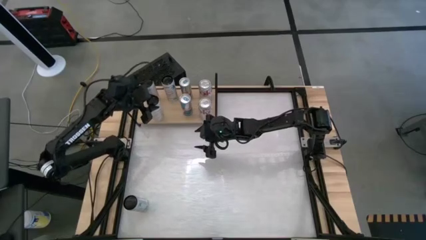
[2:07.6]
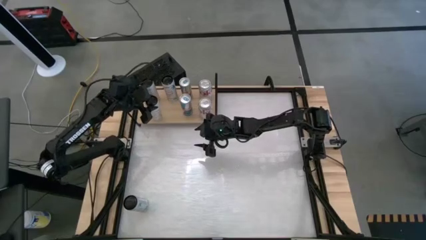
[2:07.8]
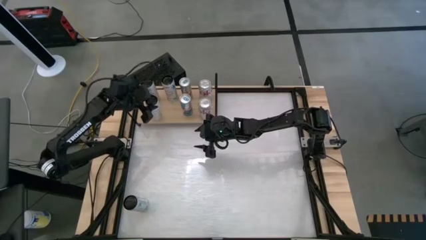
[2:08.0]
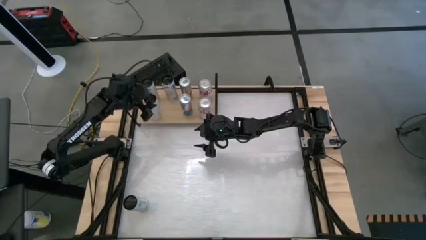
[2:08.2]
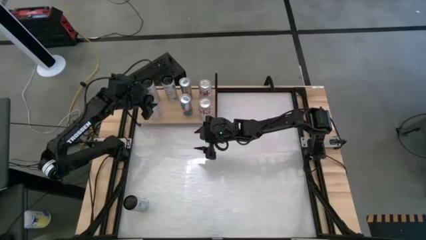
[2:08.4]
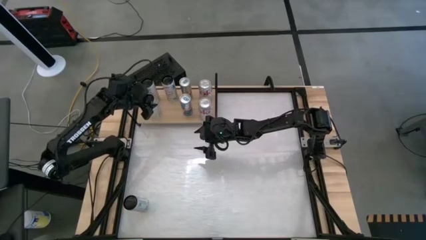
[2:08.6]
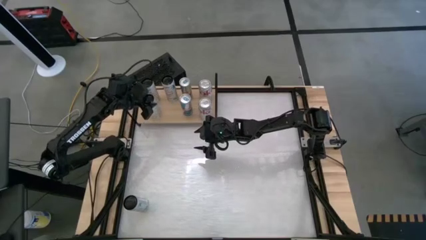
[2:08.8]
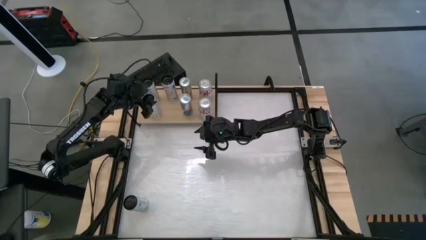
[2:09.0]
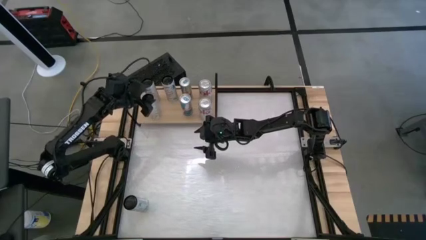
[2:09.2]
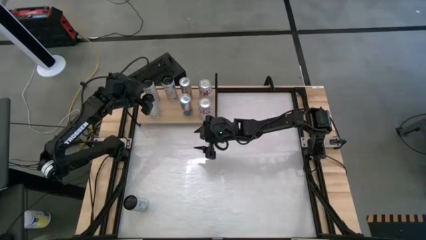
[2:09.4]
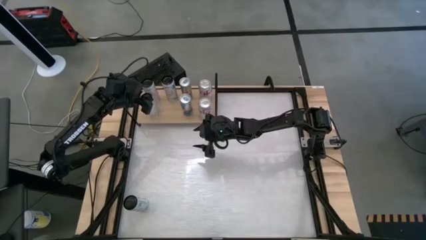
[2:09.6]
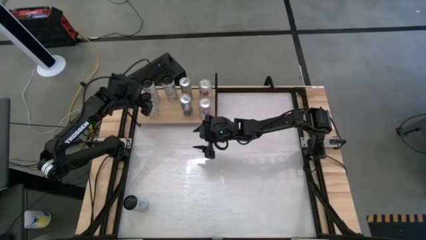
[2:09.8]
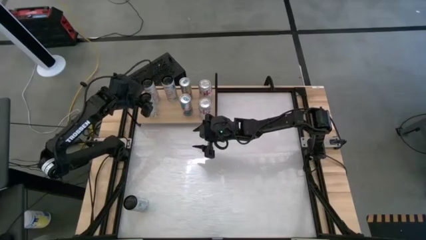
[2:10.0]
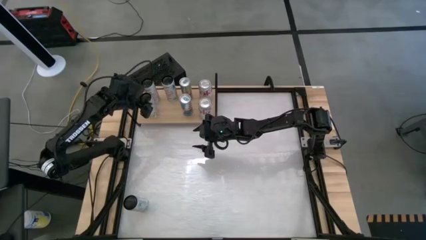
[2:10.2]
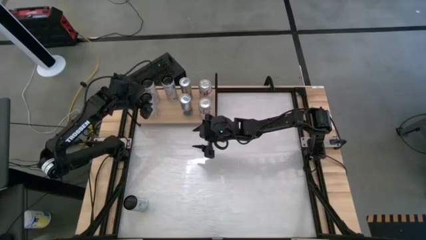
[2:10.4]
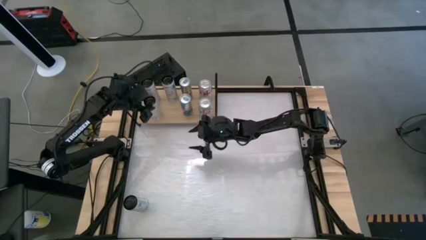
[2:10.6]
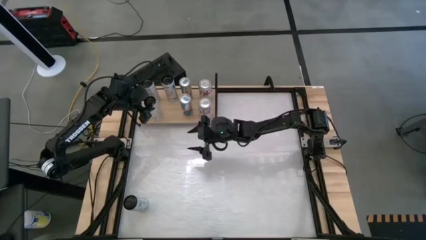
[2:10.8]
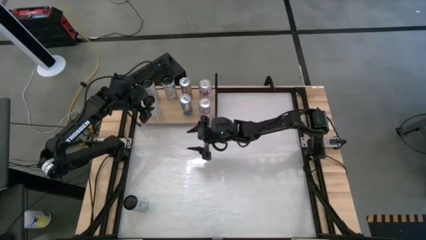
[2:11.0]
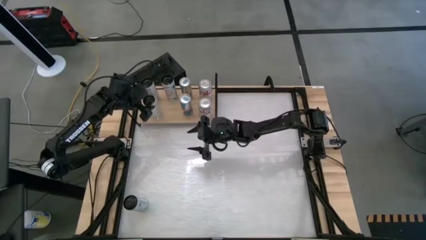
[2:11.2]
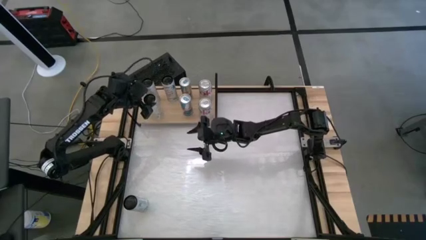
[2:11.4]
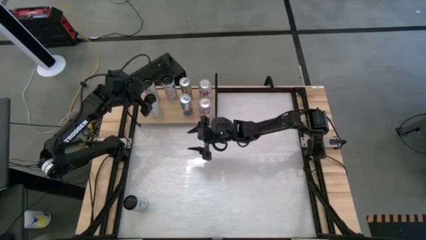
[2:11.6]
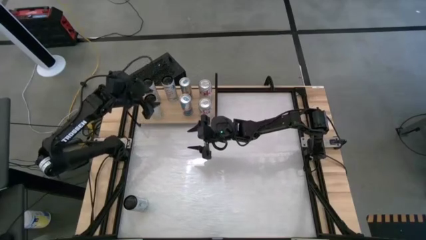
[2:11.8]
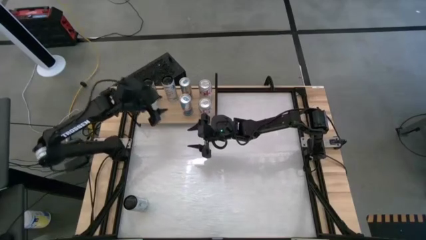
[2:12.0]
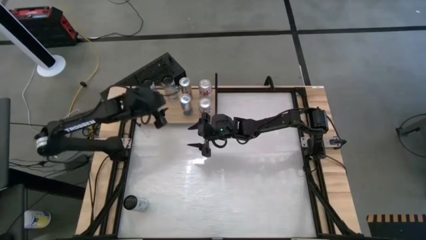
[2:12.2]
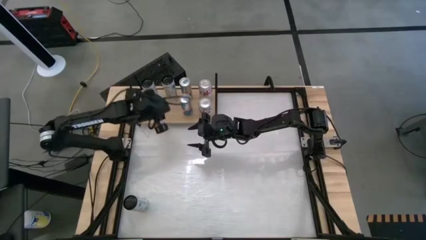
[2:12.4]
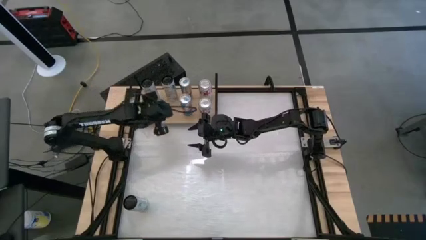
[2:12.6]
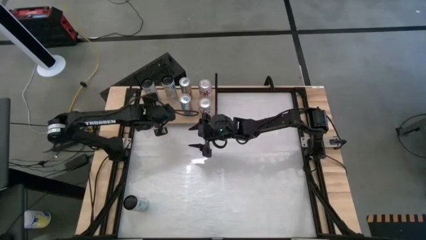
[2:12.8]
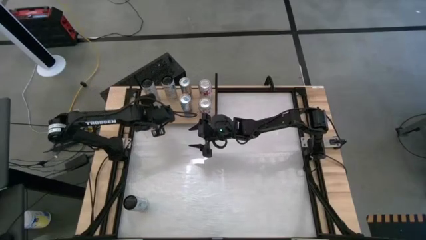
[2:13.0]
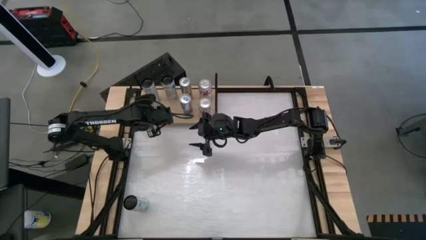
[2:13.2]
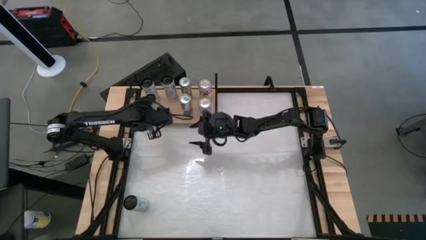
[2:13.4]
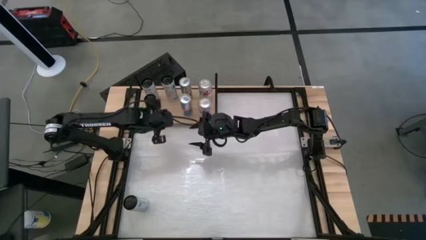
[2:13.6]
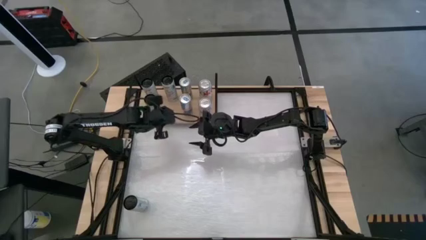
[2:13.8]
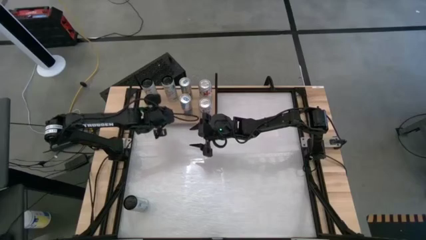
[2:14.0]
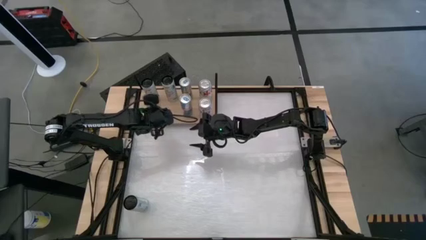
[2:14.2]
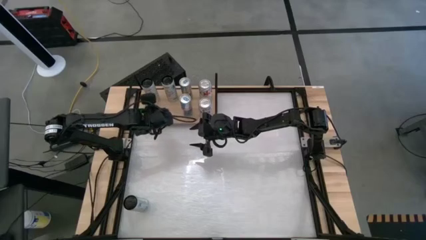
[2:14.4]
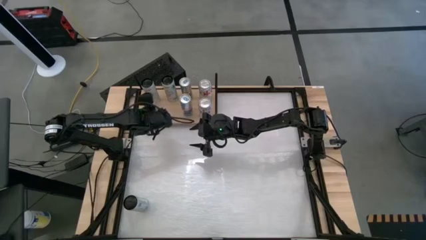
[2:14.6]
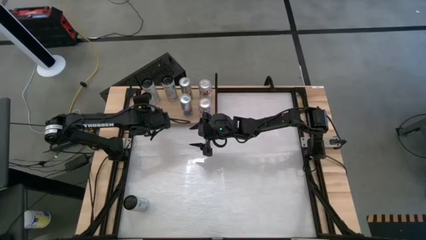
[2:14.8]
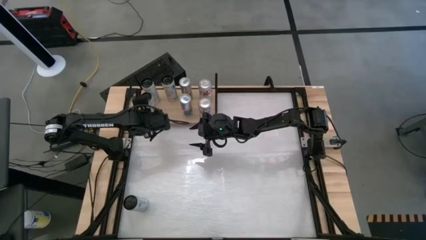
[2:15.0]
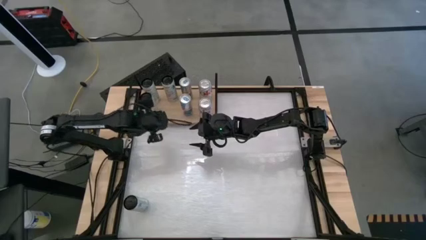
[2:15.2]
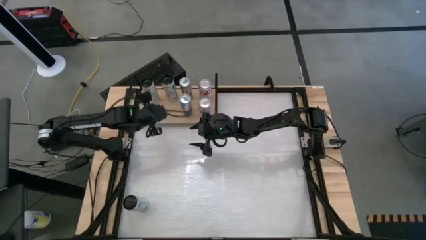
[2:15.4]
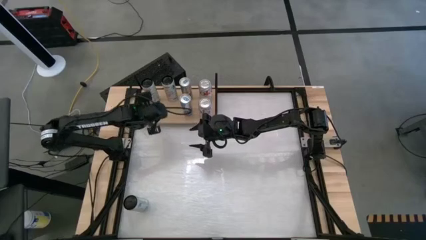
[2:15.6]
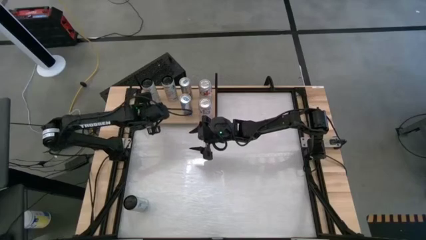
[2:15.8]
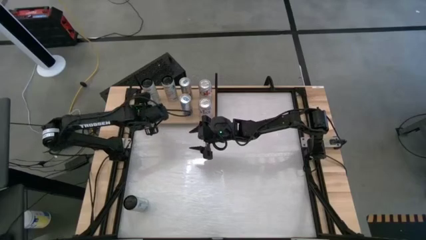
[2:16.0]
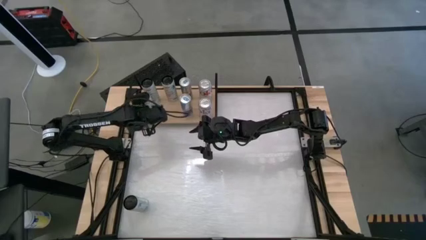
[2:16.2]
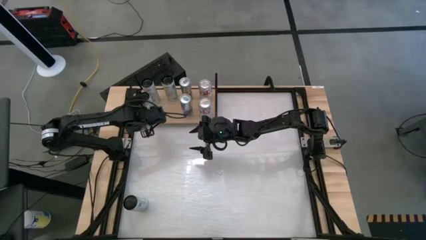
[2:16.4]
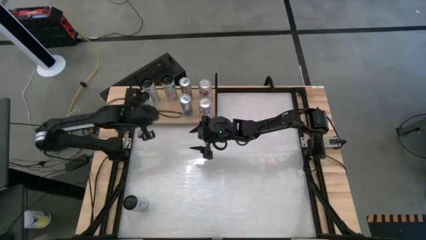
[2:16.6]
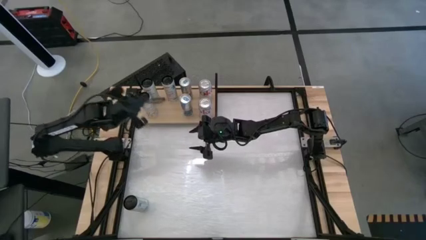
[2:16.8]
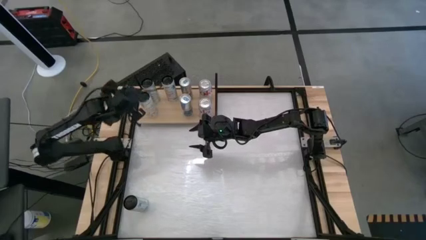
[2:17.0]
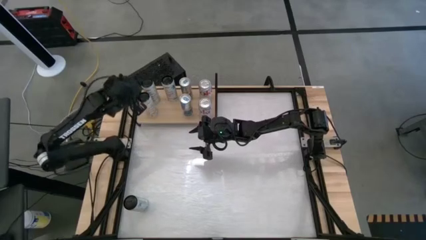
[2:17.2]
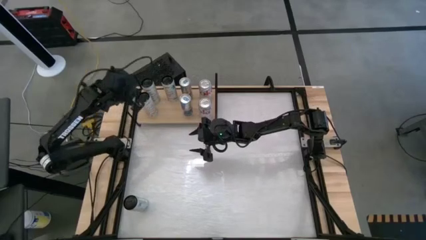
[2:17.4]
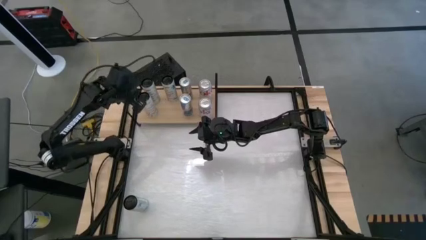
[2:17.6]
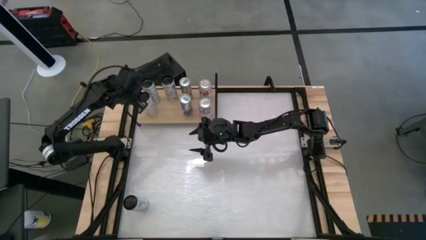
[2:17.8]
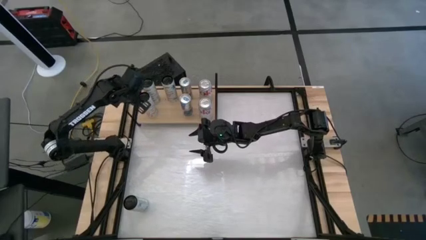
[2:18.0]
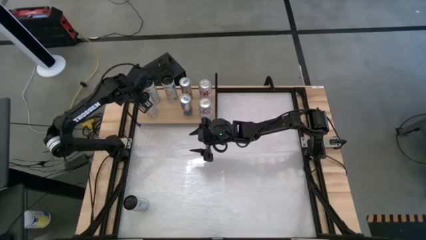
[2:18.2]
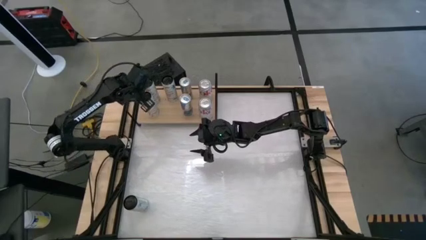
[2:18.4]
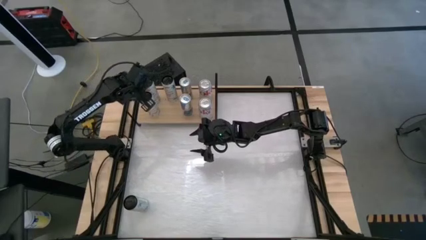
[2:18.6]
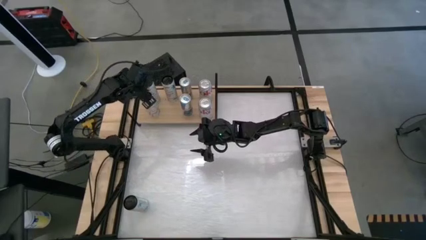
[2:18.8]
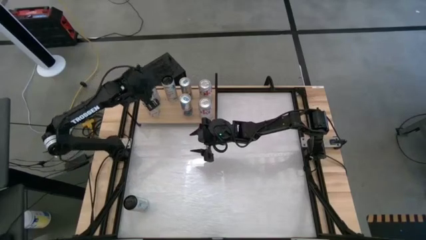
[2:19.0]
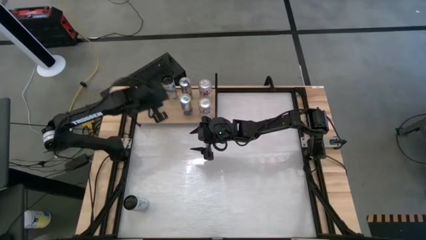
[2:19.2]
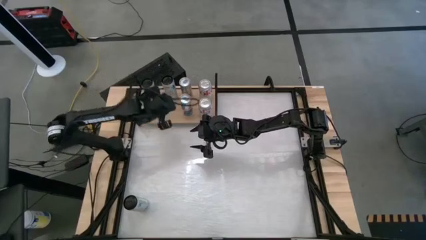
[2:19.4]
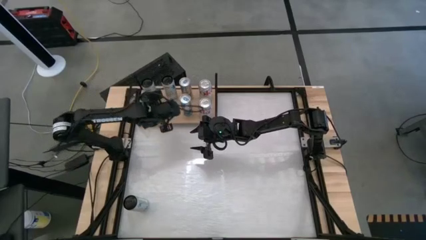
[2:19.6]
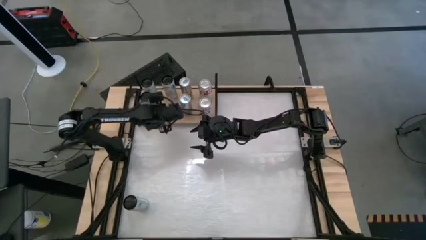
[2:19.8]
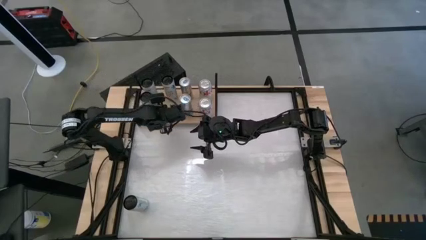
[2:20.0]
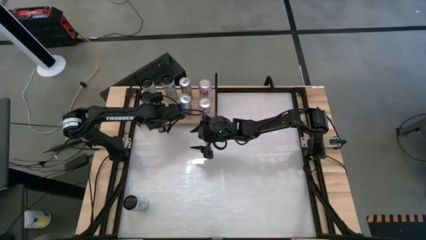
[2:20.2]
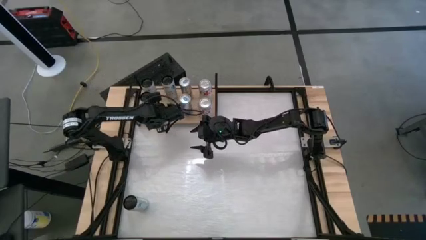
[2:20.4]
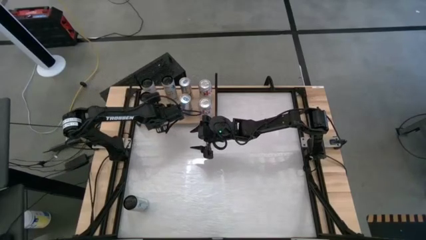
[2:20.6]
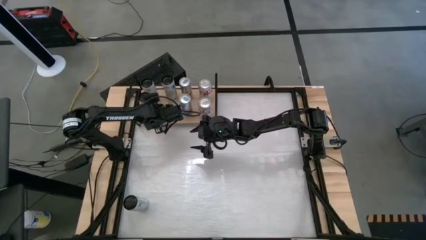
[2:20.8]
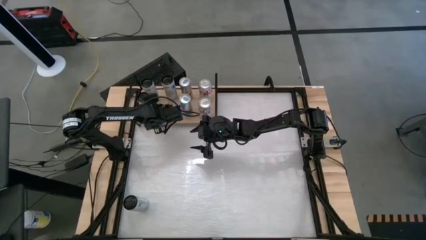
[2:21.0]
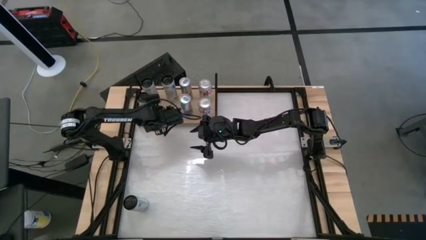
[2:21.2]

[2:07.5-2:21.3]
Task: Place canned beverage on shelf
Put the yellow soda can on the shelf aligned with the other yellow soda can

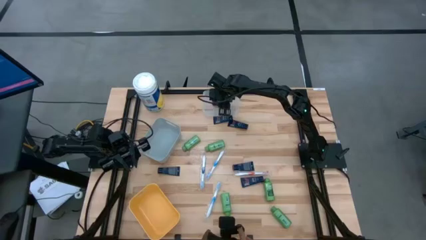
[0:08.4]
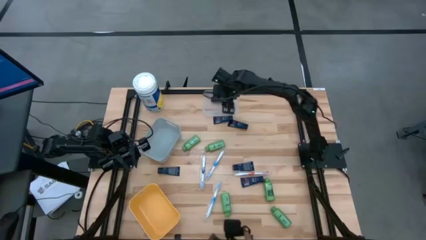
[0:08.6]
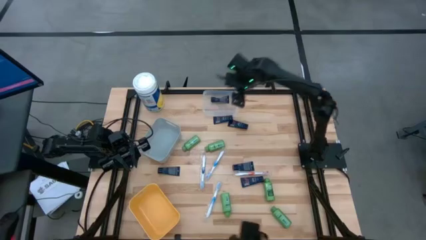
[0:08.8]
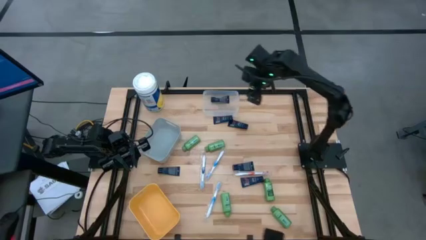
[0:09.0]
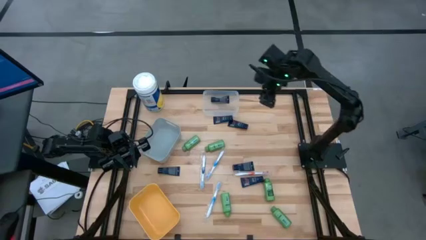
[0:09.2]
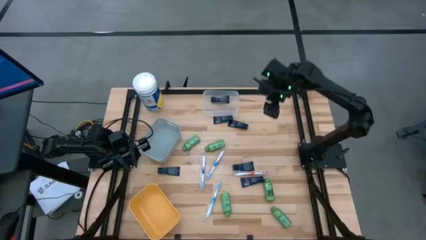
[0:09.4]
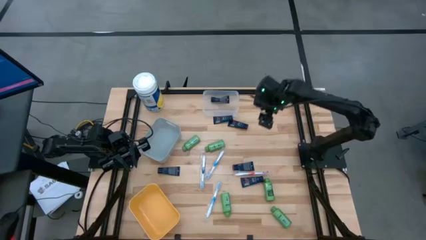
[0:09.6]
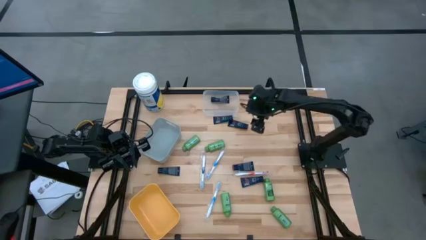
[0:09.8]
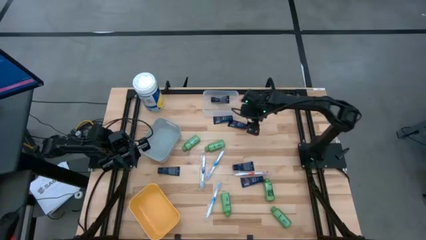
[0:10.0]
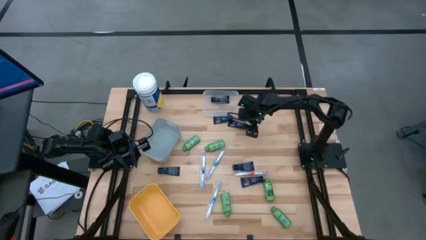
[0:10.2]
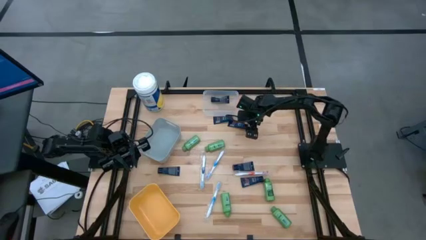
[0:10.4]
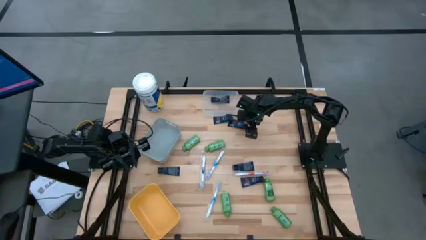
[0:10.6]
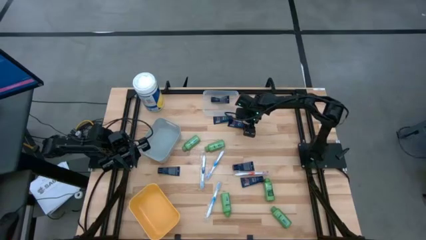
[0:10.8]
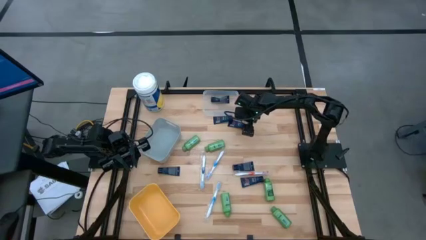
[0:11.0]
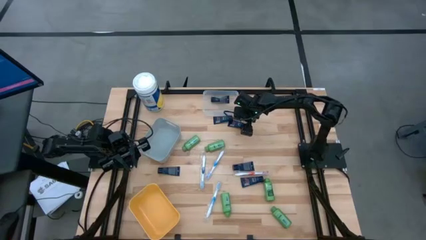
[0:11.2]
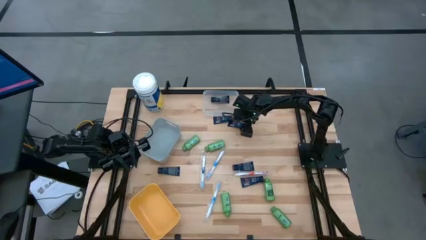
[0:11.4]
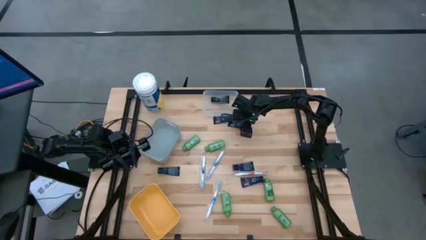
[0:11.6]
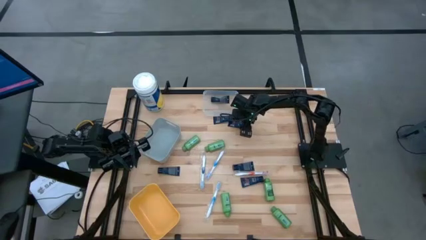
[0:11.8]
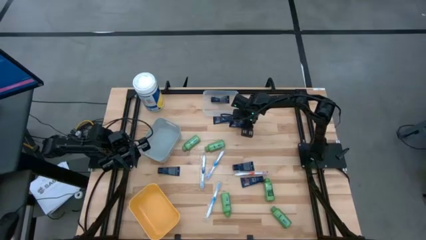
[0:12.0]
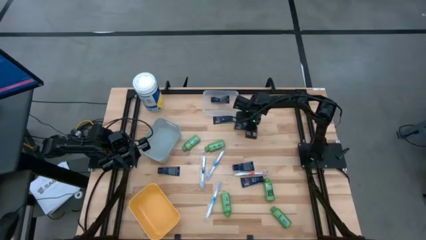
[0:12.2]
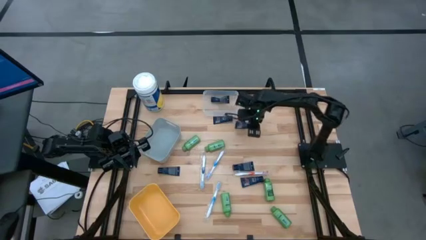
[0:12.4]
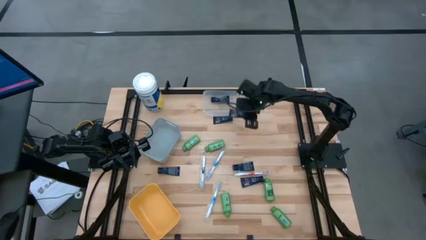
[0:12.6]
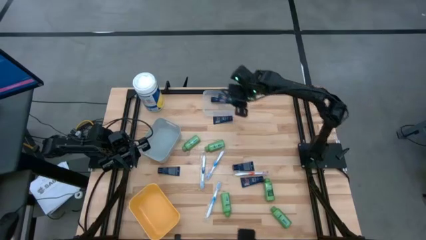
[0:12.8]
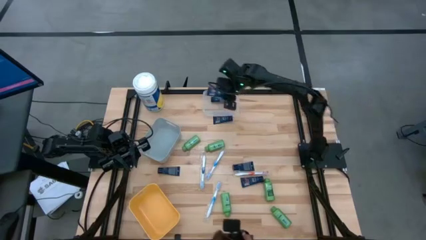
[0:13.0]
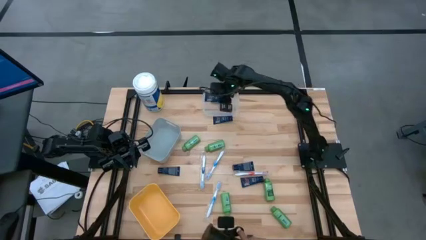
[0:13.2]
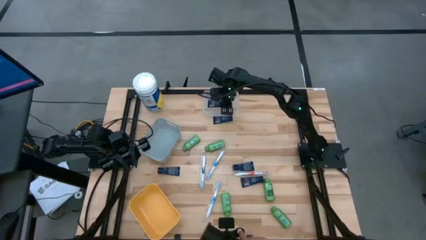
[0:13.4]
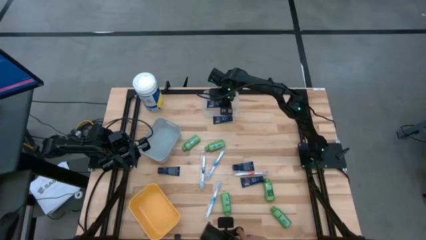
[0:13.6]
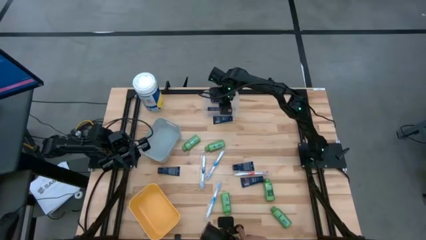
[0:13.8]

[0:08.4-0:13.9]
Task: Pick & Place Travel size toiletries
Put the blue shave cream into the transparent bin
